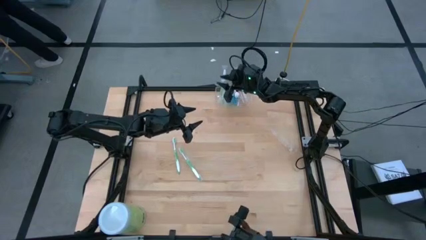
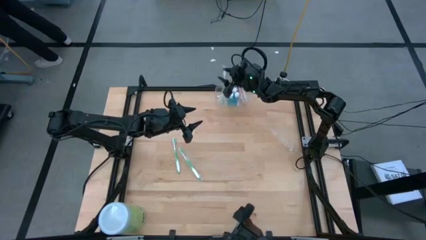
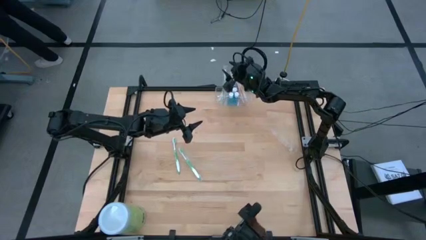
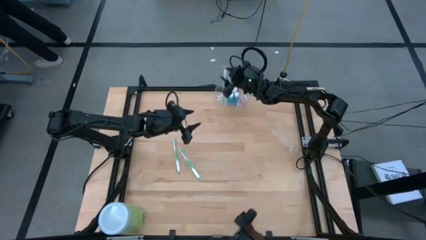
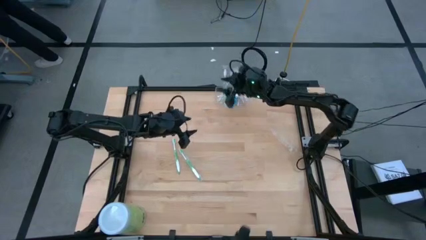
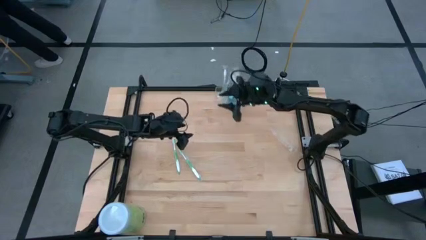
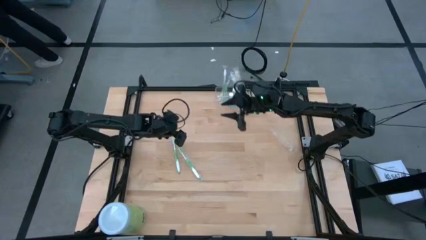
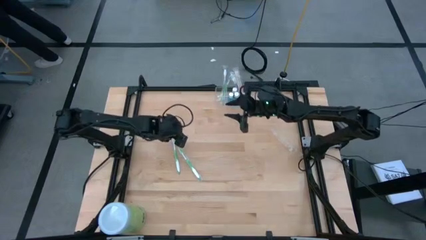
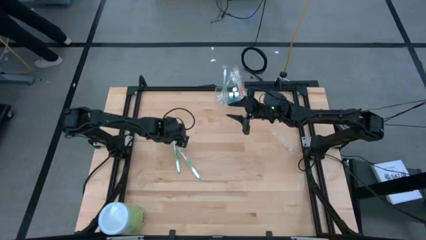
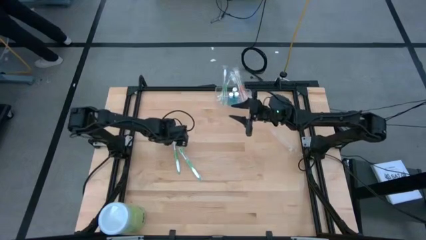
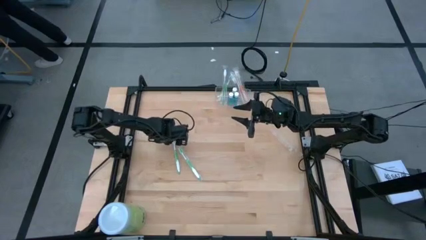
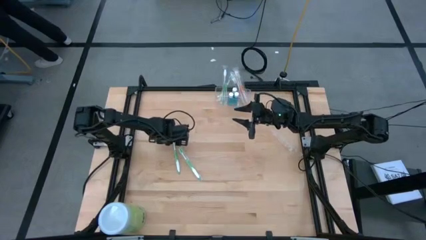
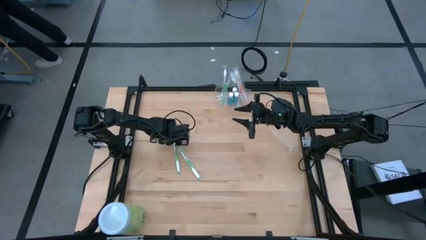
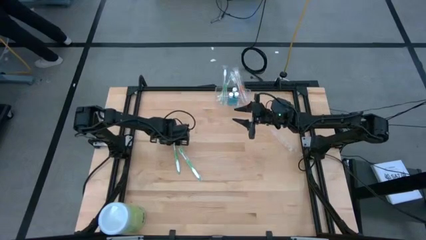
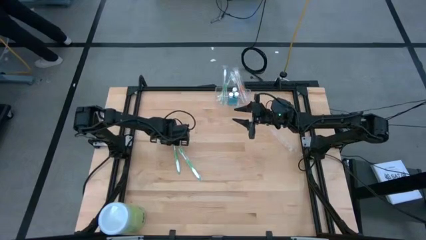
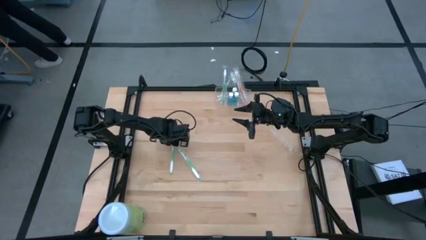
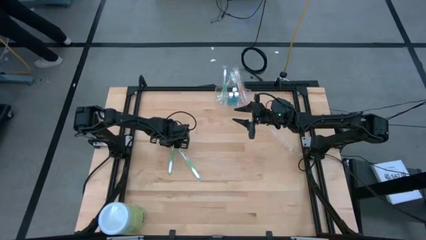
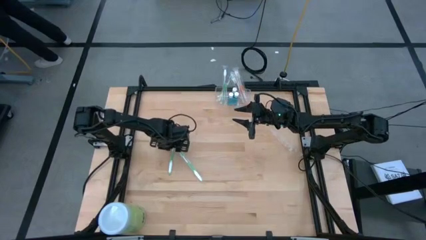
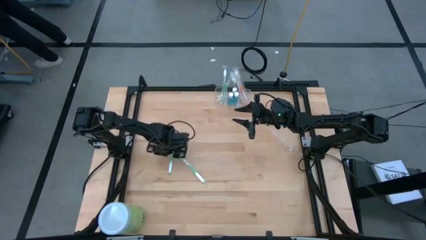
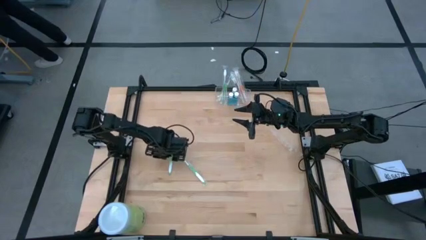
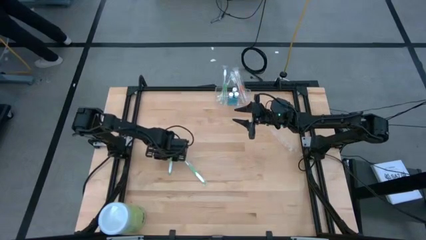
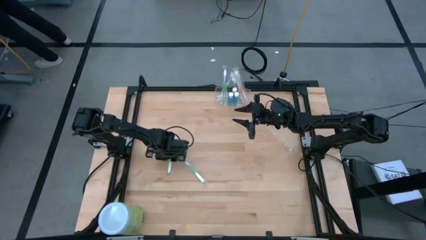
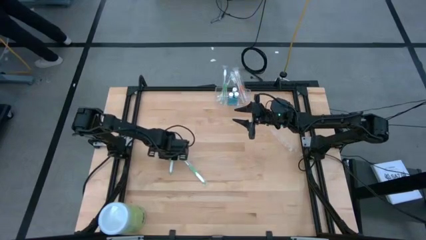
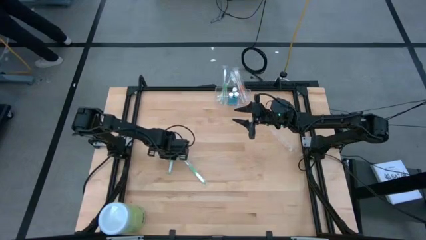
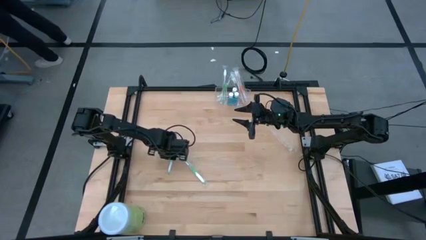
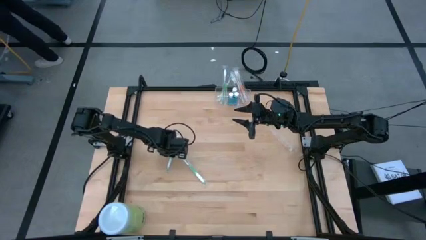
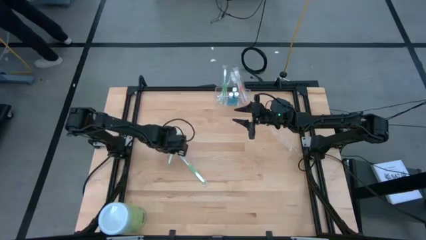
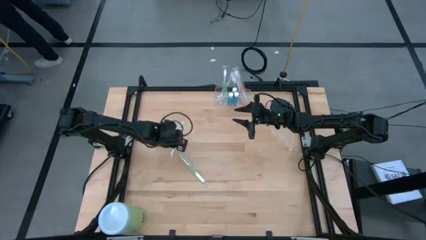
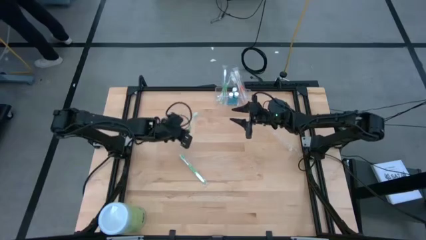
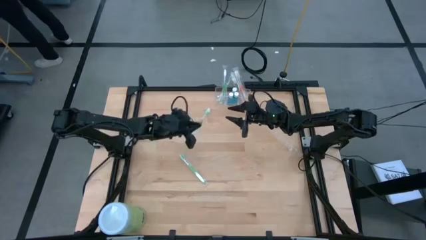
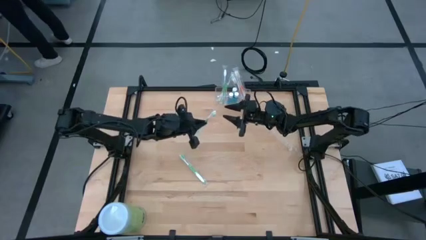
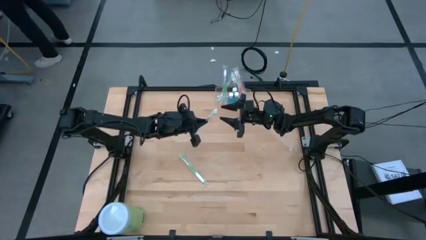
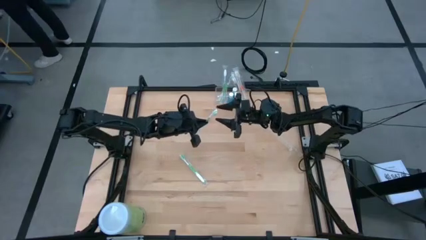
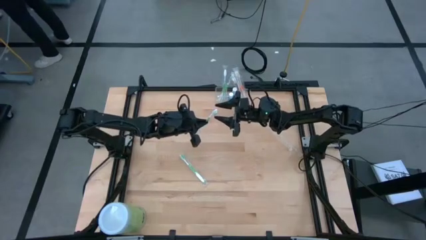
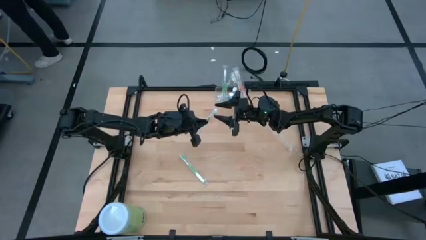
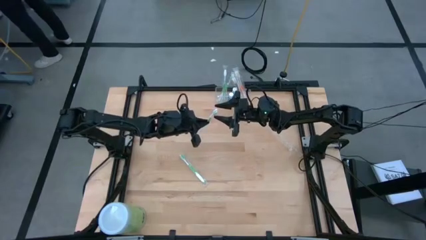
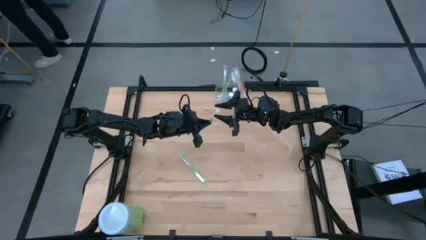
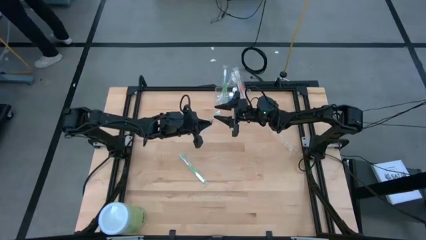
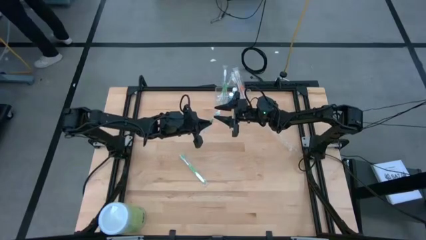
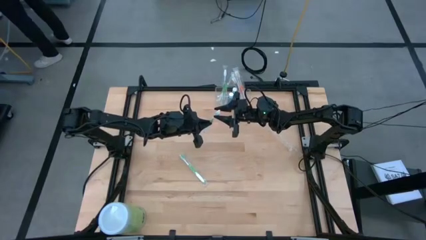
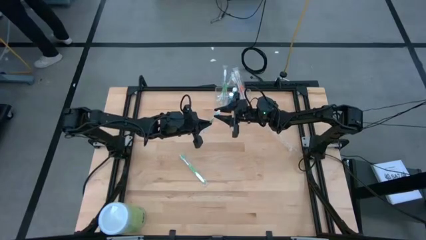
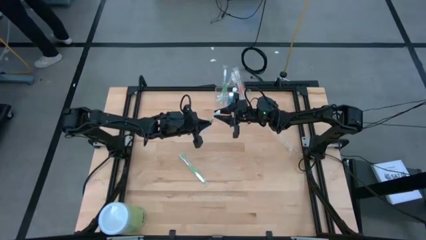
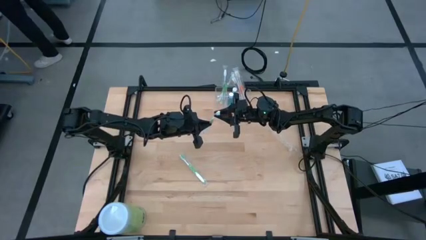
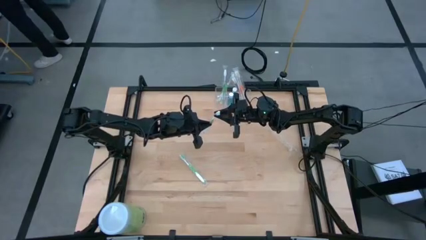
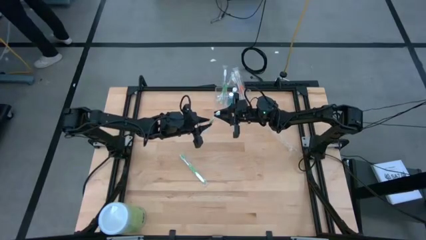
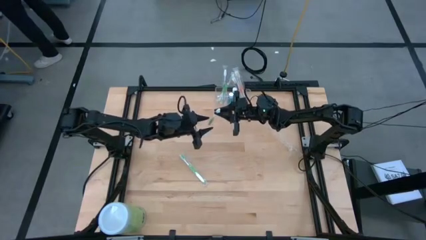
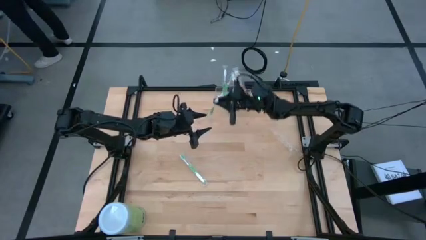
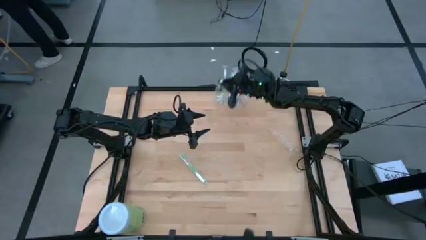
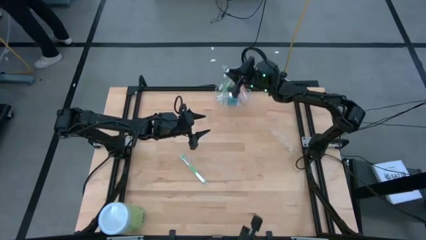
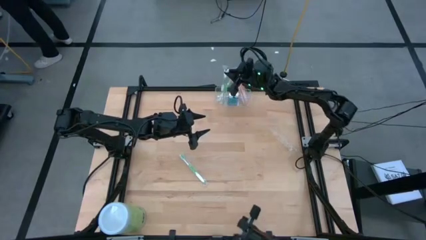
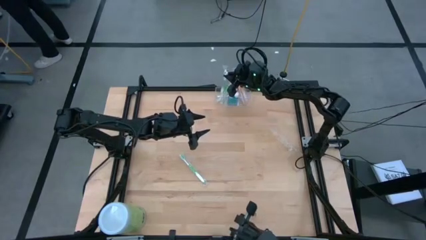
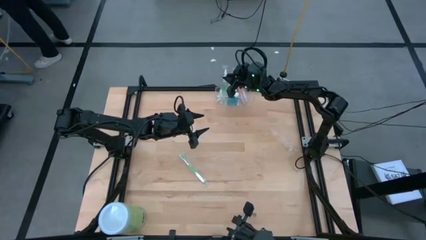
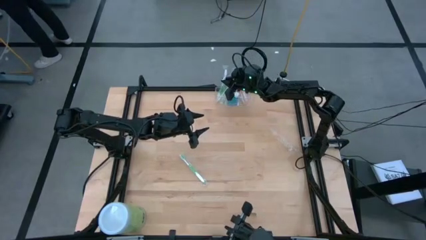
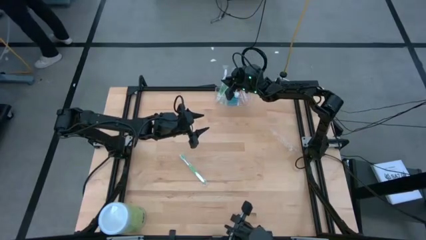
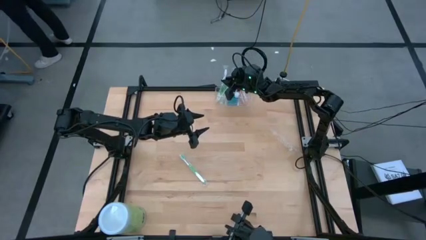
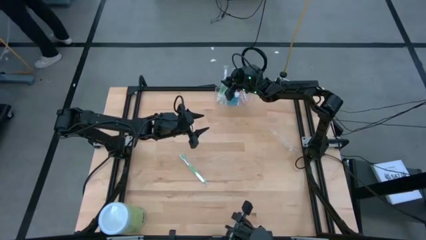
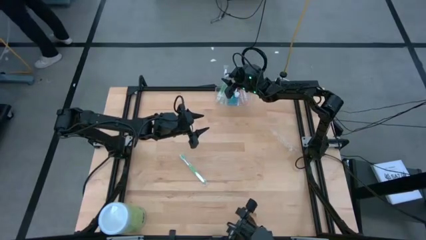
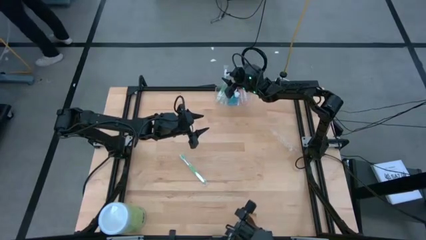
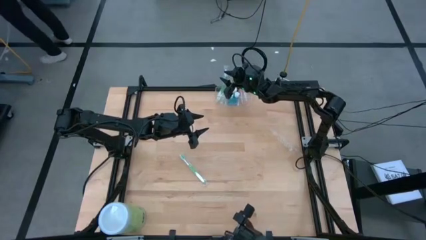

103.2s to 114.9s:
Task: Pick & Place toothbrushing station
Put the green toothbrush into the transparent organizer
